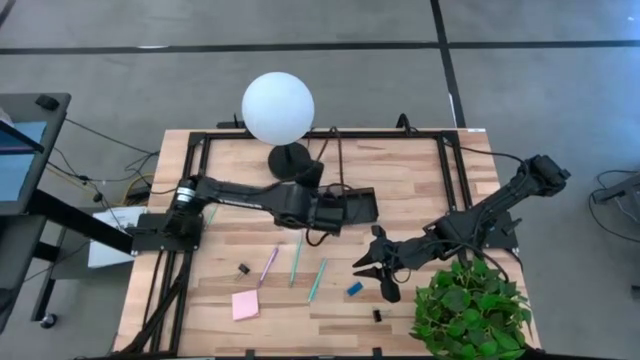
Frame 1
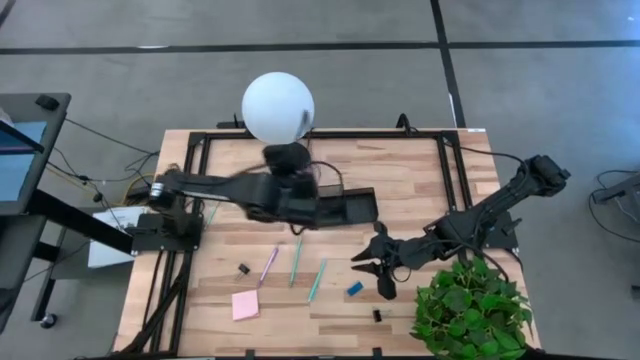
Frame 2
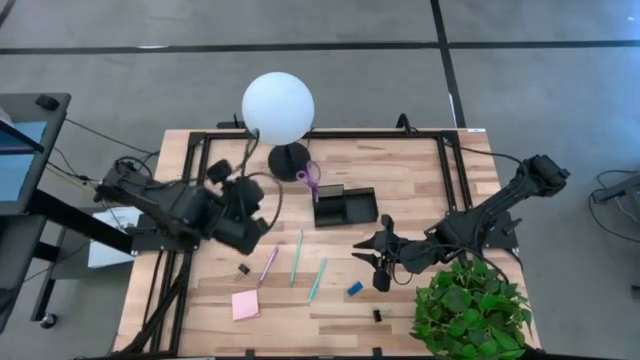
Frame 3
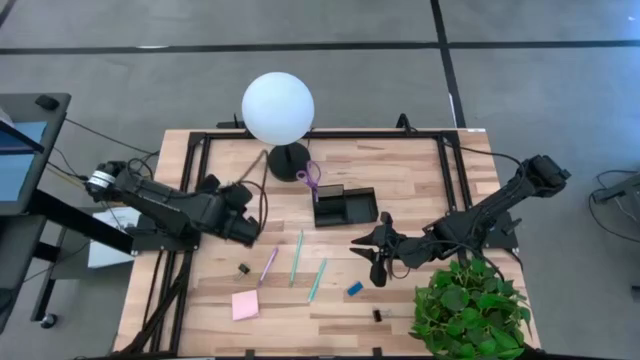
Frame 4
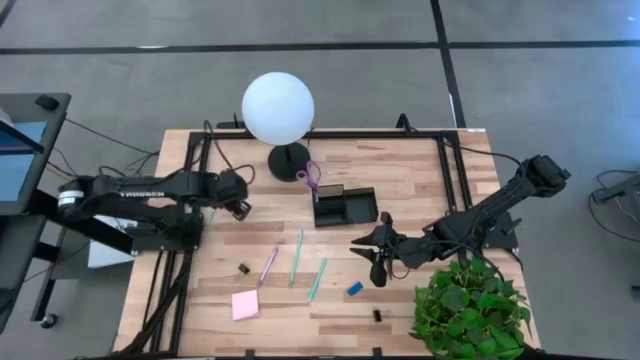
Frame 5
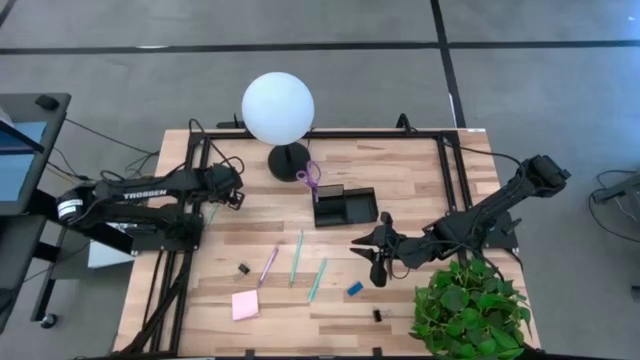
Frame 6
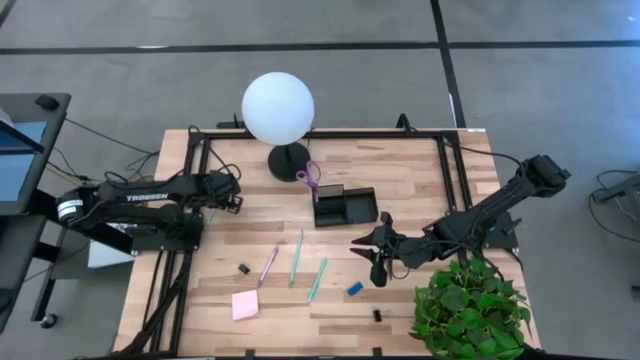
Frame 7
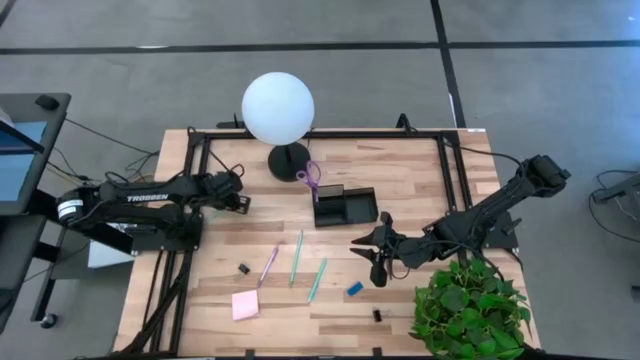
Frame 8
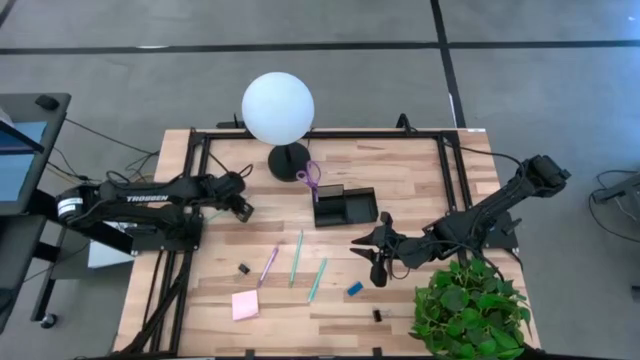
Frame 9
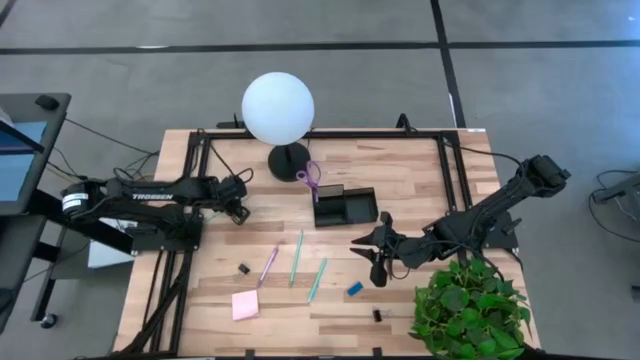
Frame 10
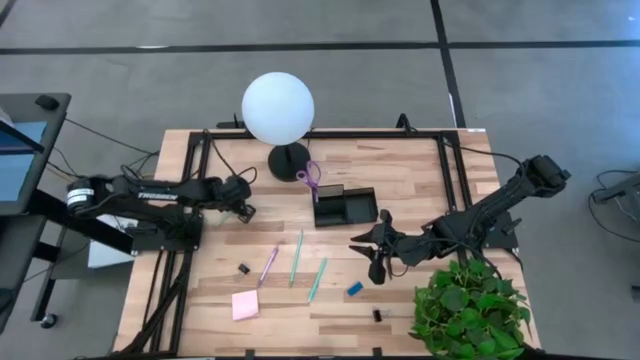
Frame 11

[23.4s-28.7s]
Task: Pick and place office supplies into organizer
Put the top left light blue pencil into the black desk organizer

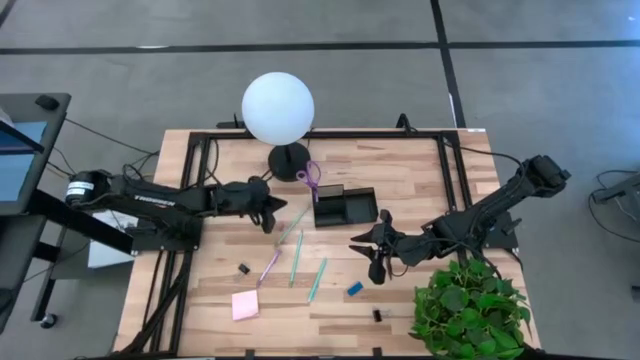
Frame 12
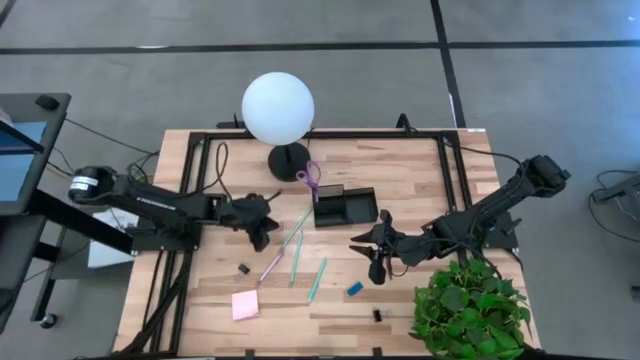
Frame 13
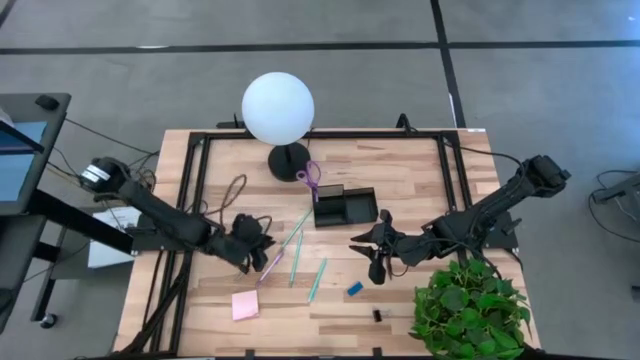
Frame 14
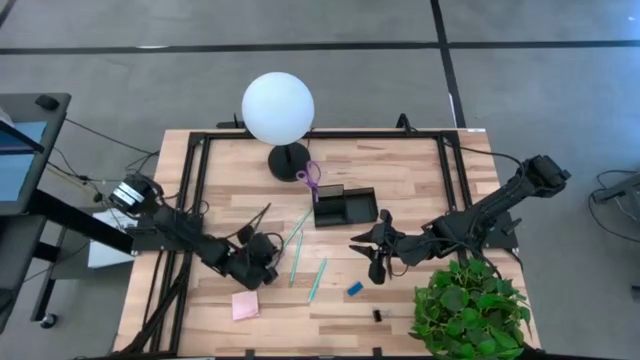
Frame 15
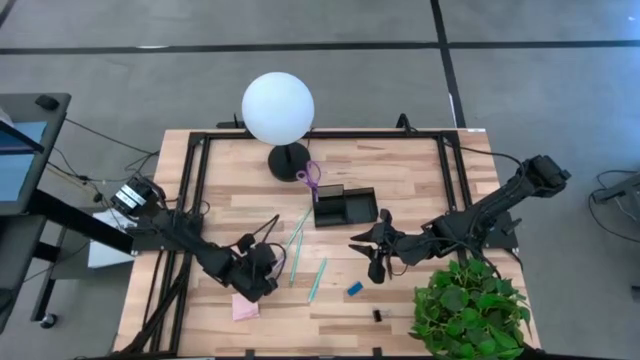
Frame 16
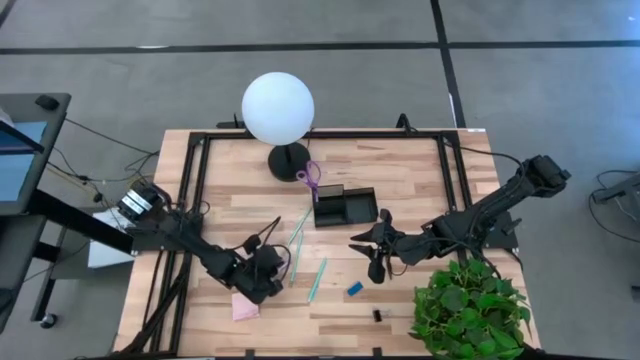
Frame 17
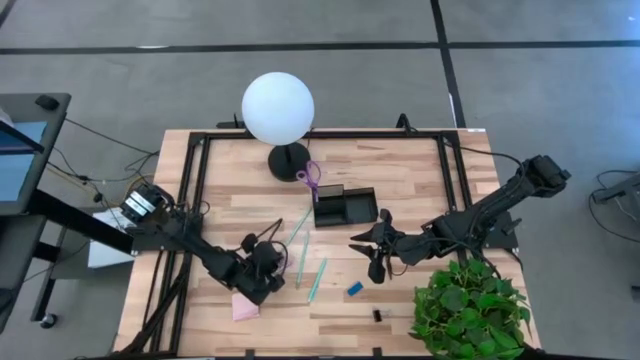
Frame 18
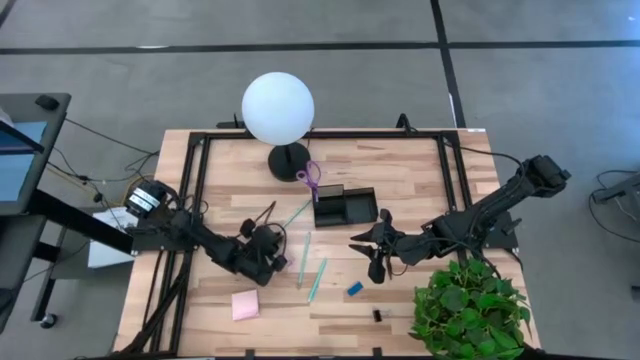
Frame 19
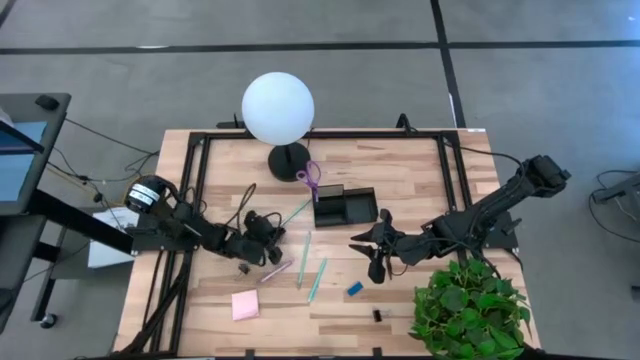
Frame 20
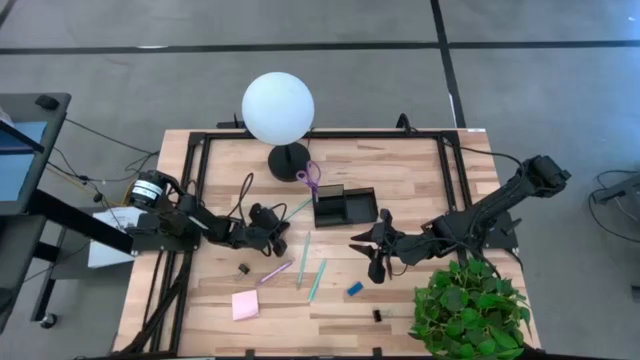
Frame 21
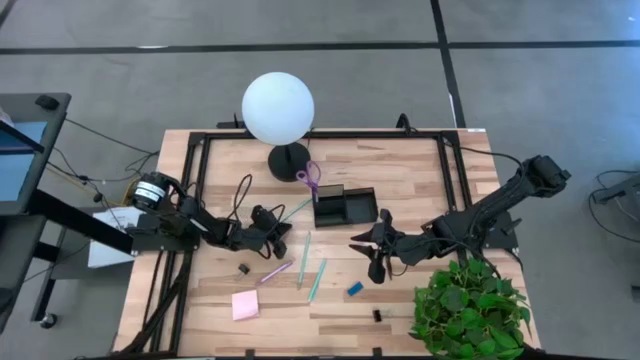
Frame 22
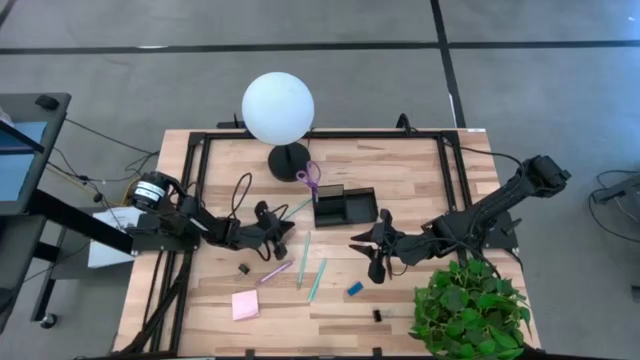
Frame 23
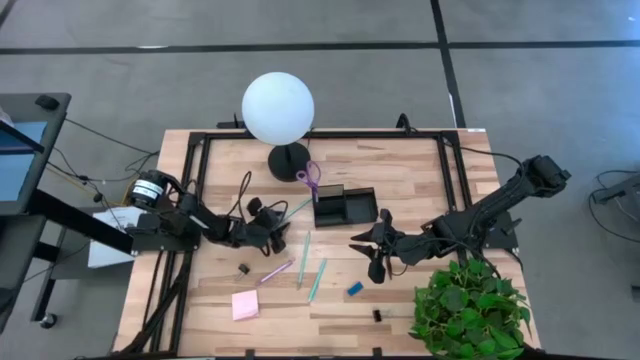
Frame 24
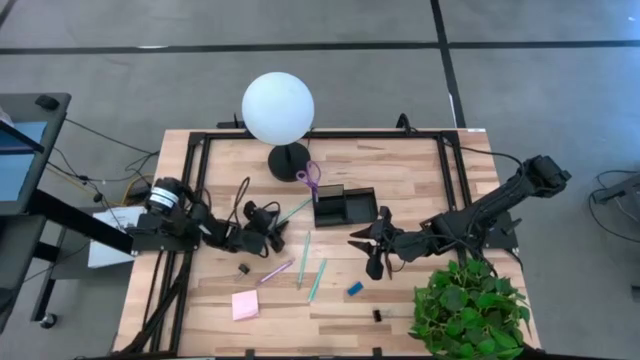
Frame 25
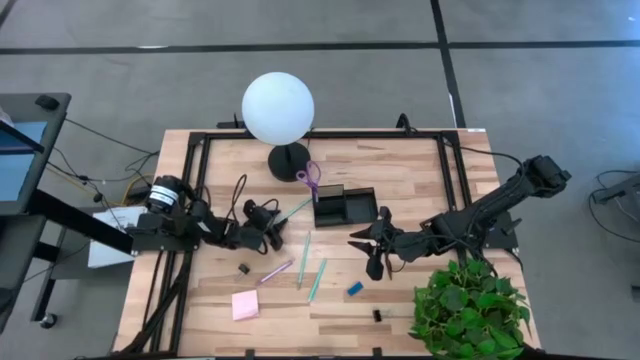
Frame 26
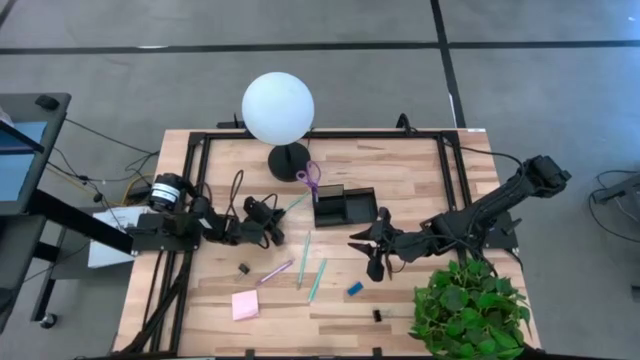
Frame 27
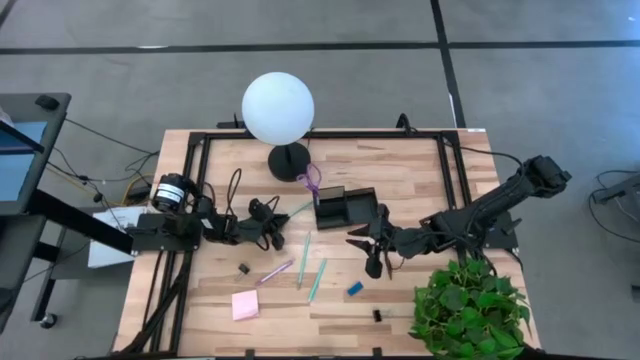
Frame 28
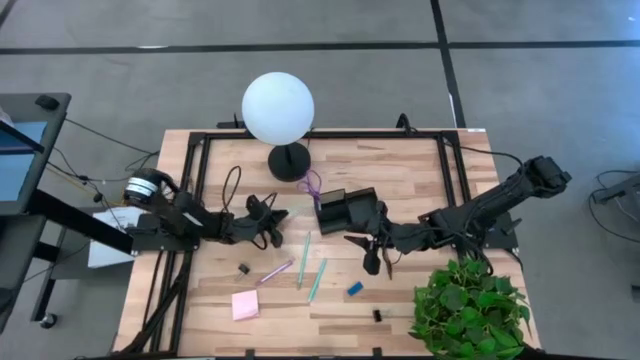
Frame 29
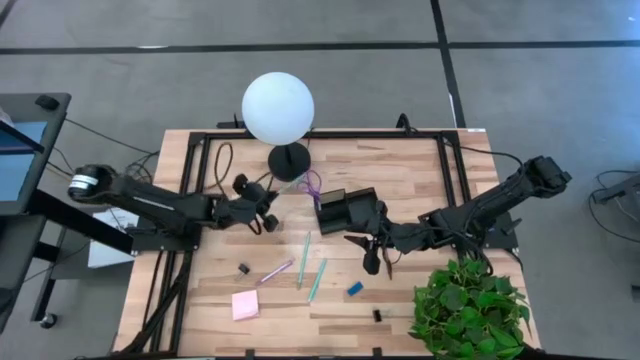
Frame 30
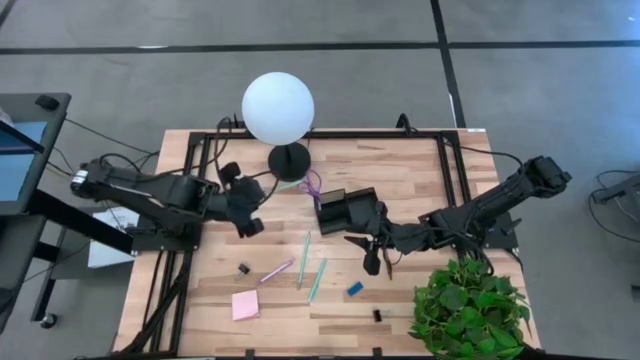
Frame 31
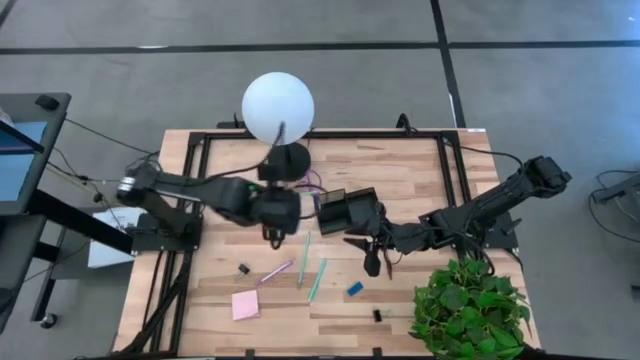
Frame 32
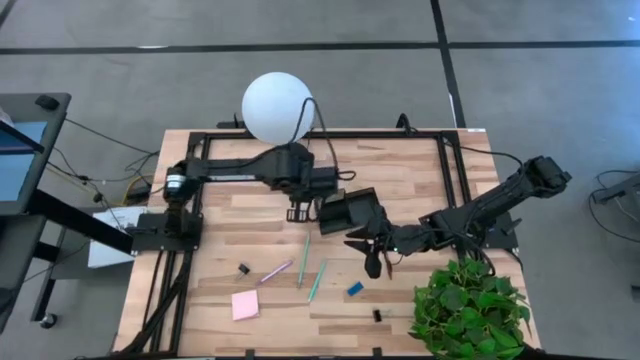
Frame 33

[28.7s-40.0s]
Put the top left light blue pencil into the black desk organizer

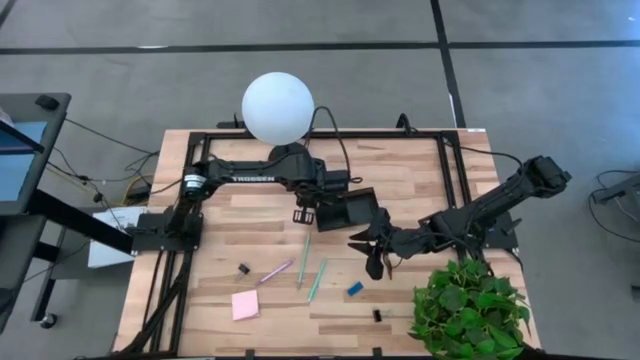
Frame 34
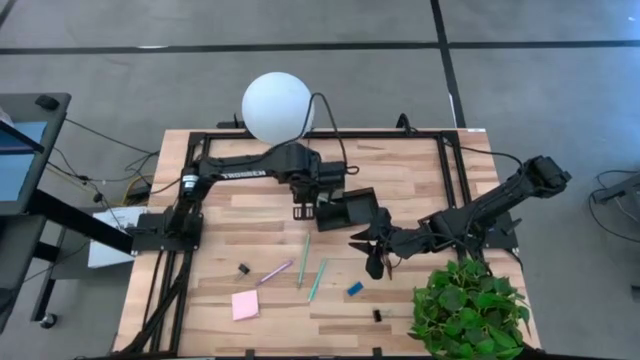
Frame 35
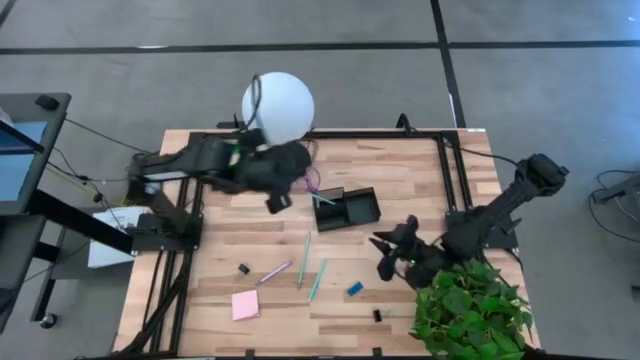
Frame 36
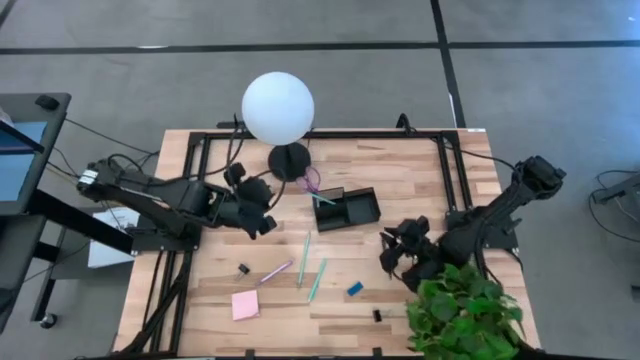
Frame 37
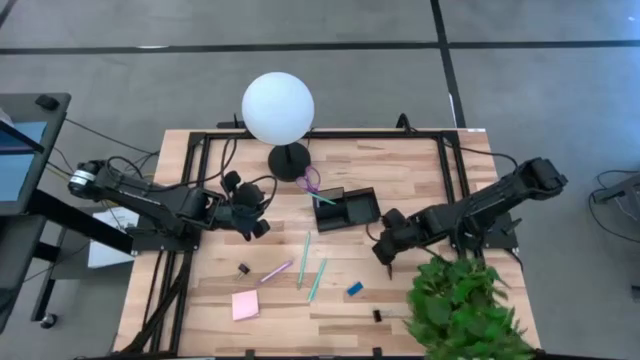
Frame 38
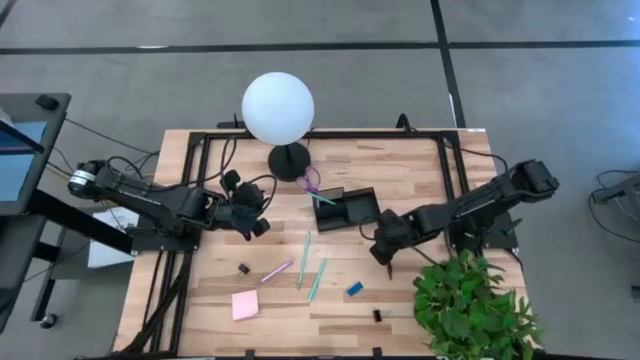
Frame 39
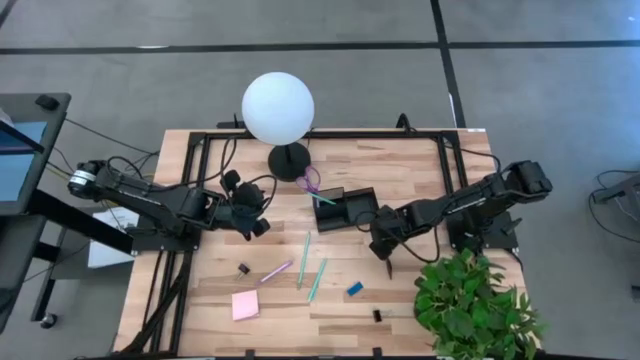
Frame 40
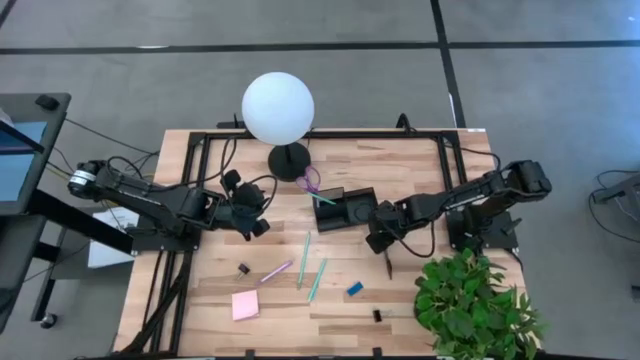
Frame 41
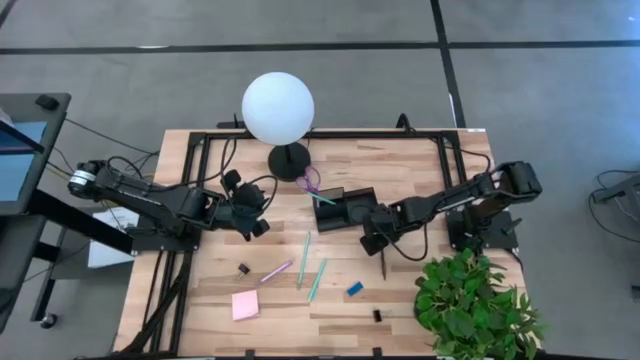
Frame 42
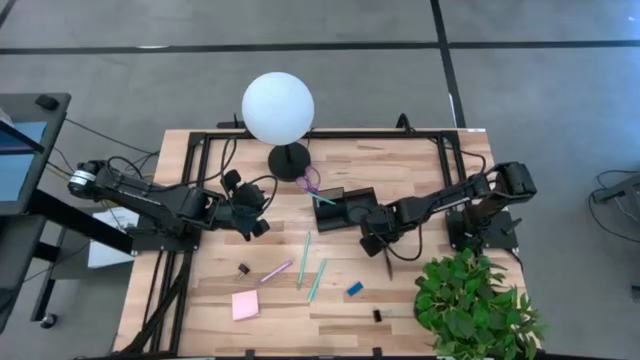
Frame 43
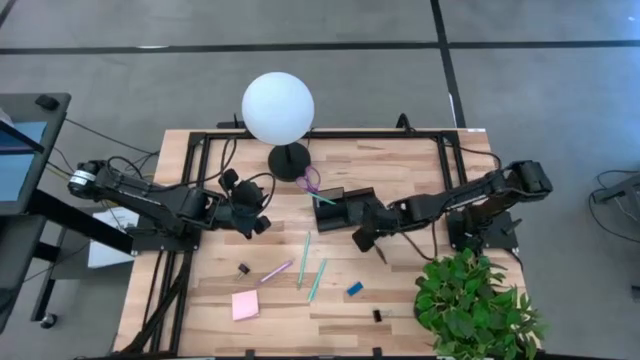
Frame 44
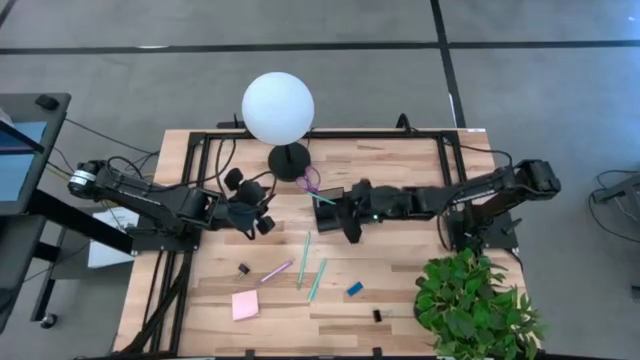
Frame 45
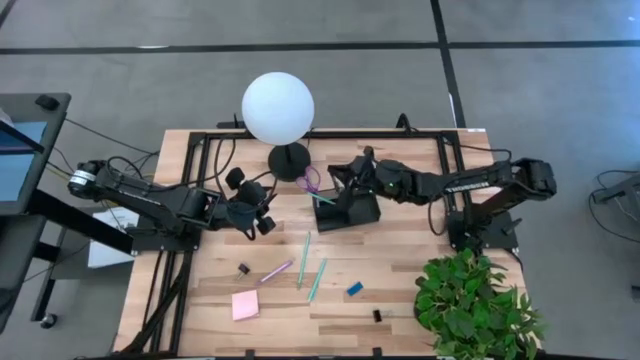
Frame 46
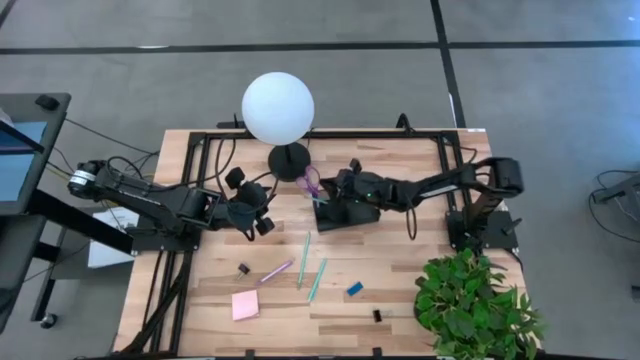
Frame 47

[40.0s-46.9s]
Put the brown pen into the black desk organizer
